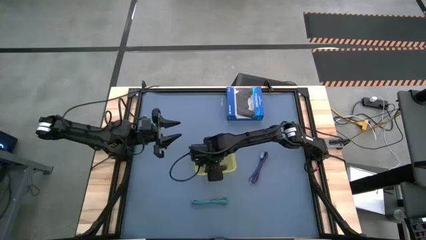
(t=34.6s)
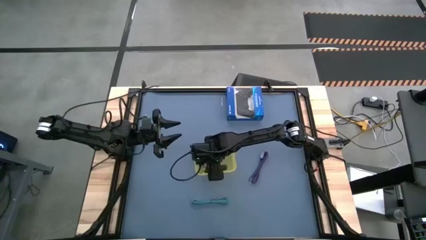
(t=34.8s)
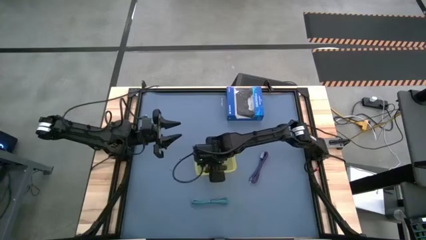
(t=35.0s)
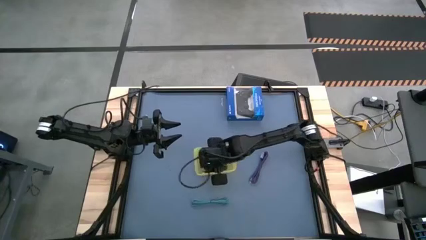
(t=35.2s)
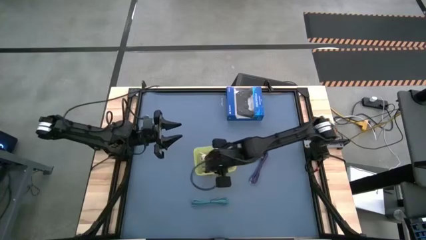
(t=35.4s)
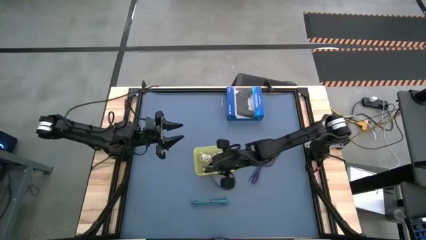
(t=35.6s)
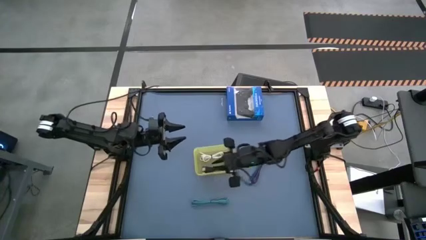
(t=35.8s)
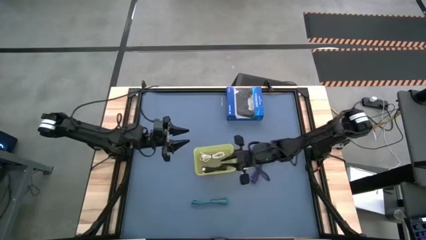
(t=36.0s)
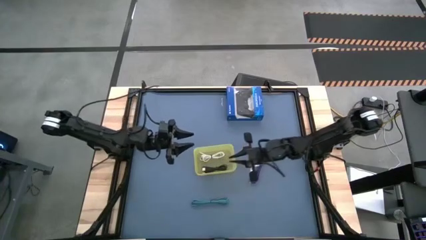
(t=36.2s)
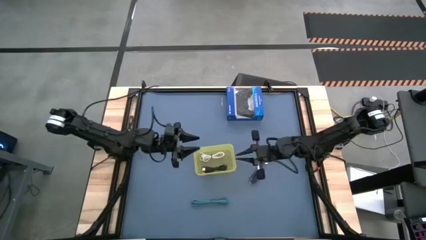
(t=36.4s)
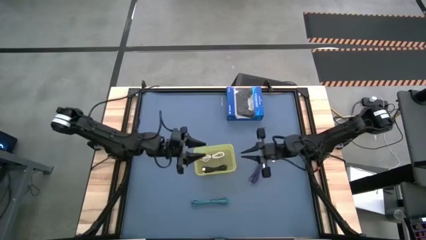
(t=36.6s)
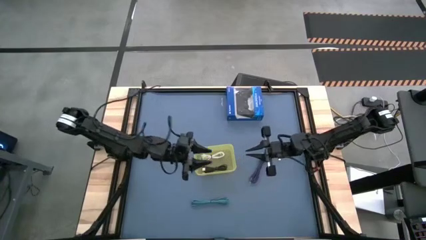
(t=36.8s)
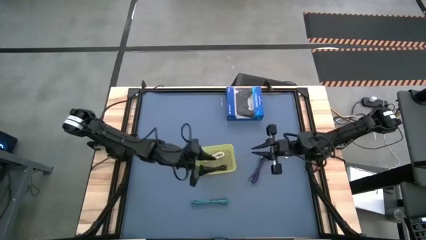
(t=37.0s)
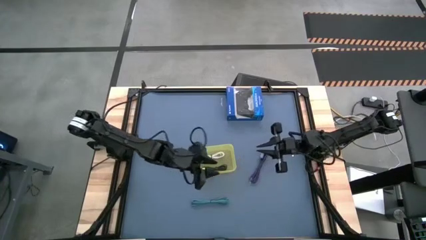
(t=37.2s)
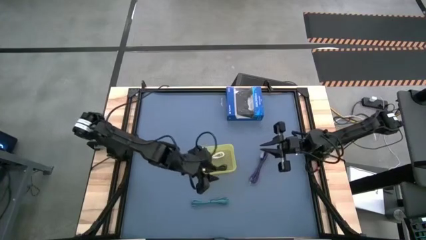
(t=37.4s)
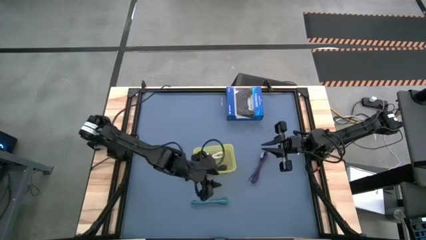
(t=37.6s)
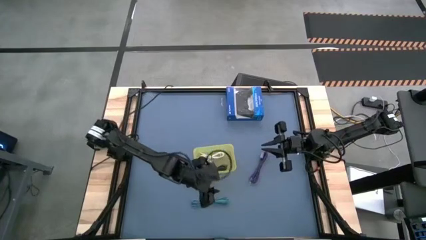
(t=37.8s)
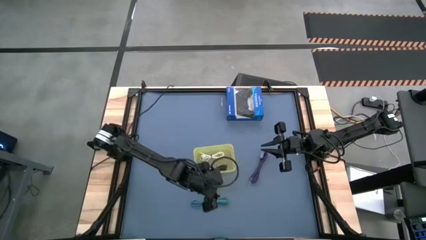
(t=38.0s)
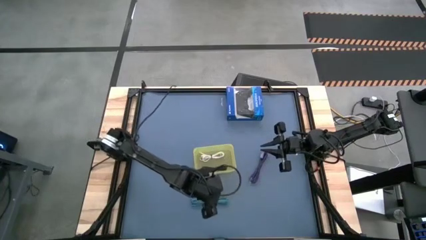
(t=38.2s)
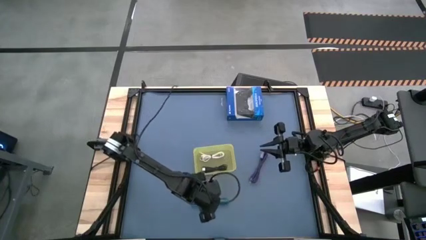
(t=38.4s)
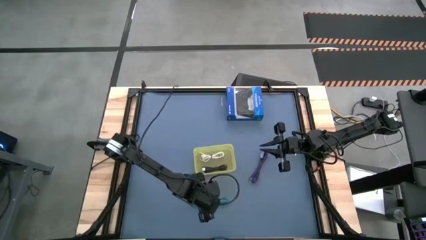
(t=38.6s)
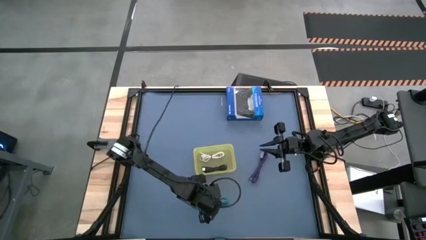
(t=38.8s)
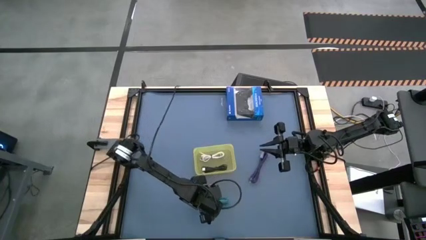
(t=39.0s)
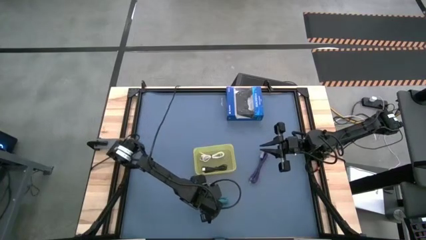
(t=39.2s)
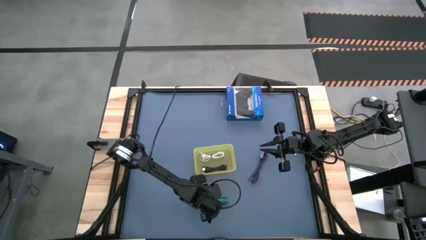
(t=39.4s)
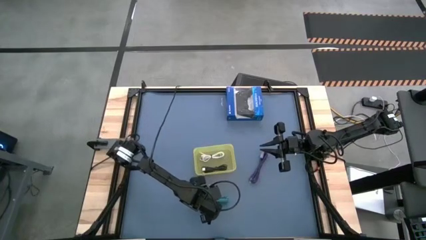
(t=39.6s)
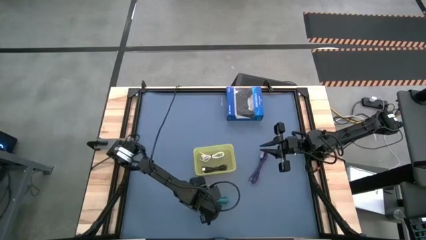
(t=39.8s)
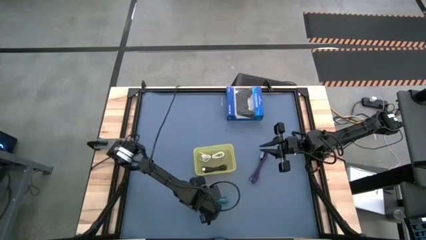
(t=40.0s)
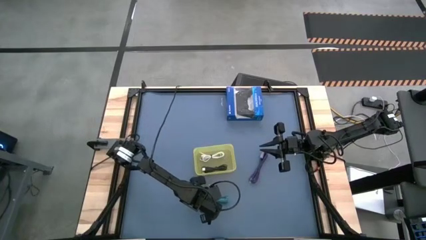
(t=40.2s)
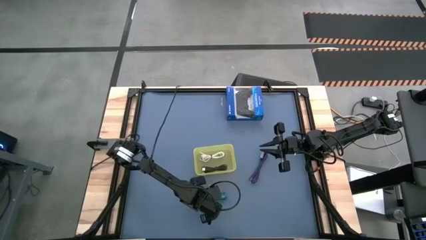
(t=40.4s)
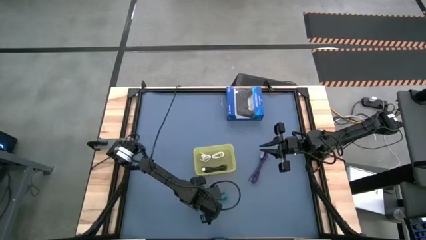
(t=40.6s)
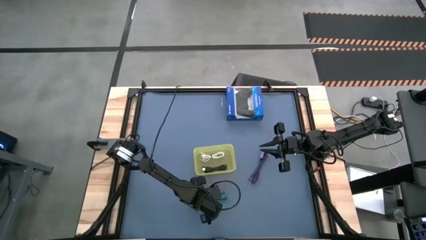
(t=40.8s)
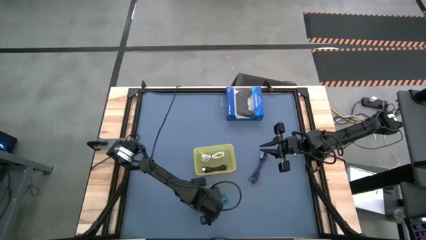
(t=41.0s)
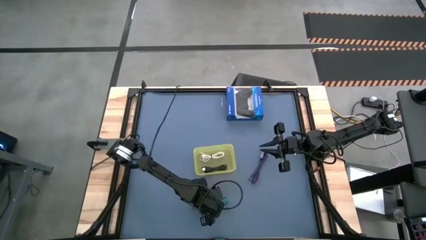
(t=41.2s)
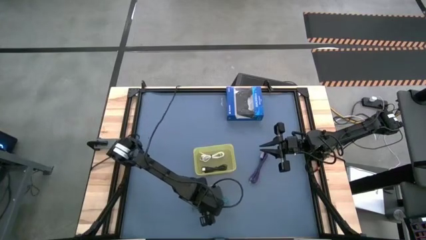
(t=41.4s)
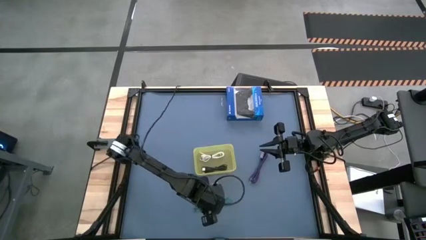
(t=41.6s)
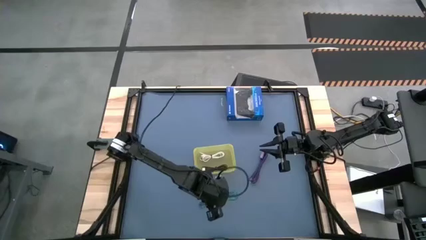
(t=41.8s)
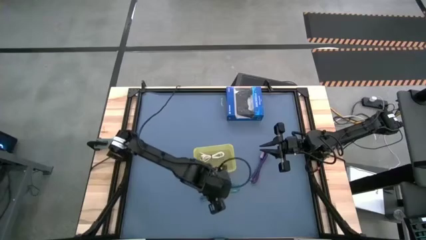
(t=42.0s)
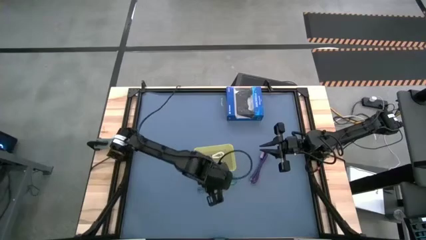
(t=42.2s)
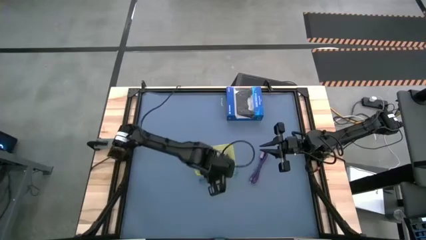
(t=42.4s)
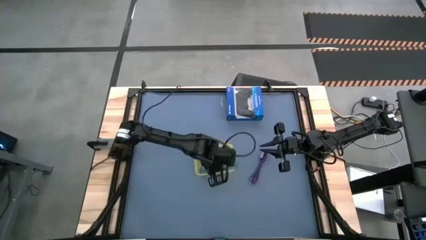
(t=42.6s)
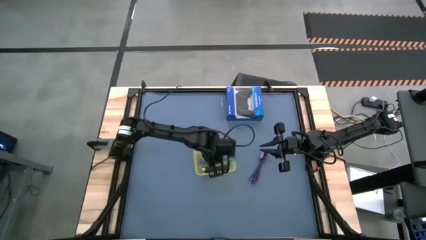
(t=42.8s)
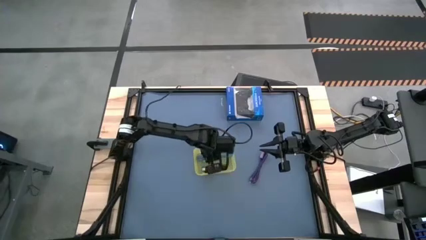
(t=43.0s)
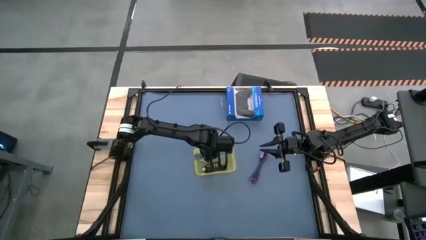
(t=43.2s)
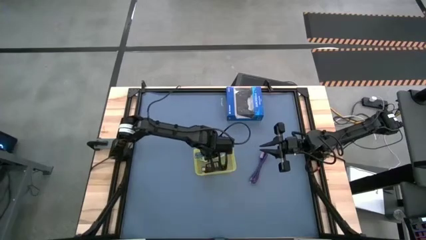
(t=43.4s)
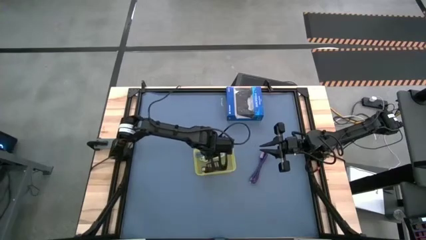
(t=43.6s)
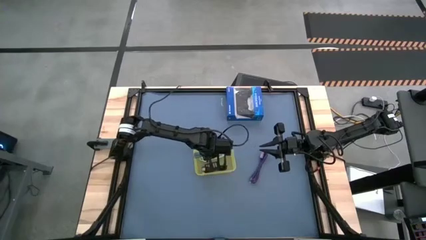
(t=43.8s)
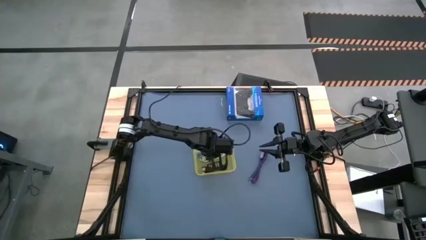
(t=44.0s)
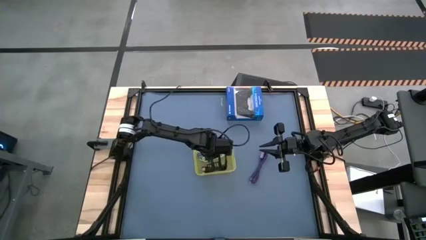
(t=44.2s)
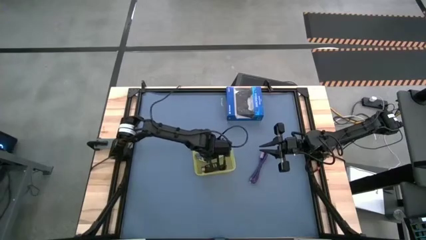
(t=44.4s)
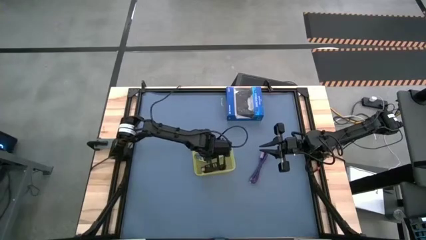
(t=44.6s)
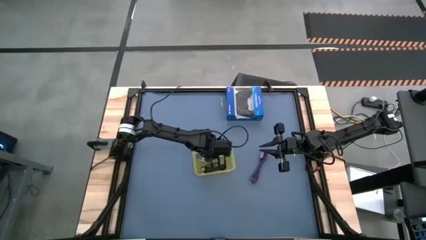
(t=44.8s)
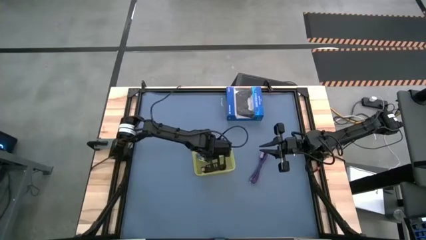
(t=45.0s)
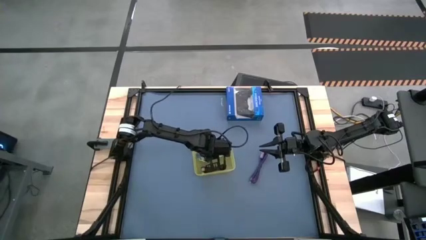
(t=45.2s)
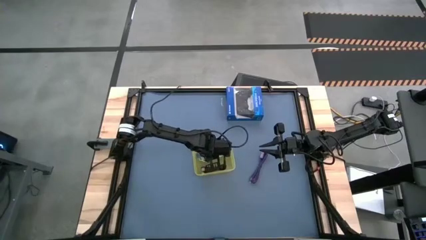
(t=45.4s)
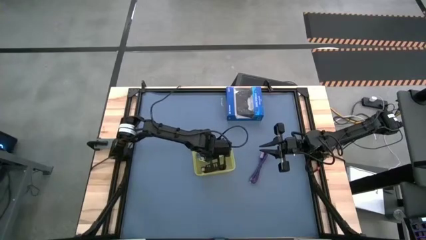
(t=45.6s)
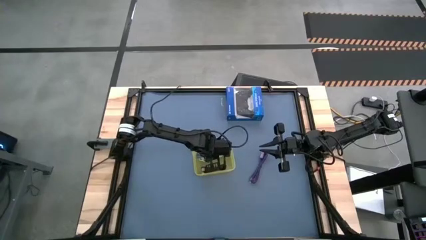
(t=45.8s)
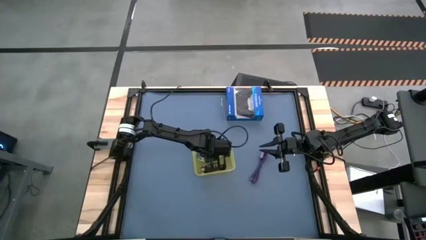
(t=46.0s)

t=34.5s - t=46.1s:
Task: Pick and place USB-C Cables
Put the blue charger cable into the yellow bin

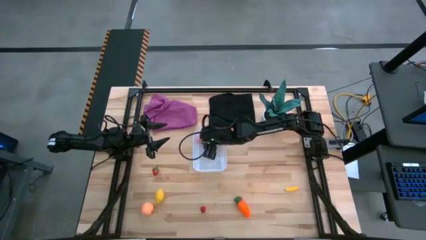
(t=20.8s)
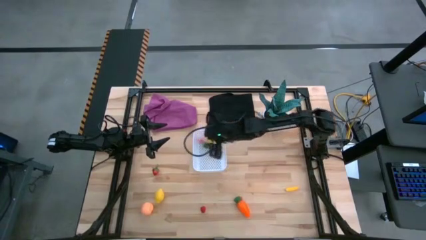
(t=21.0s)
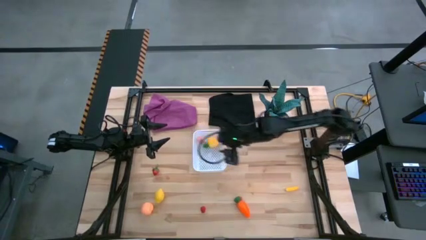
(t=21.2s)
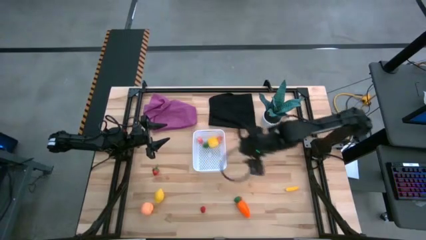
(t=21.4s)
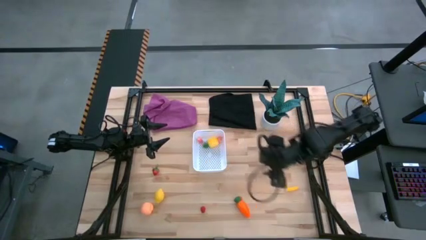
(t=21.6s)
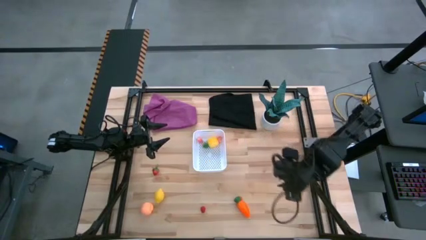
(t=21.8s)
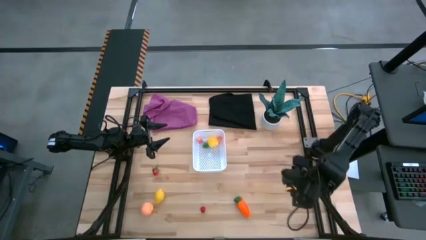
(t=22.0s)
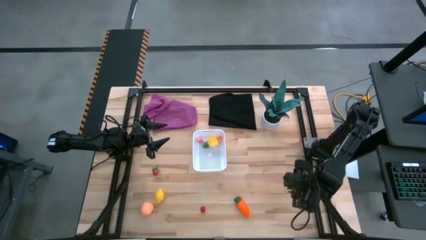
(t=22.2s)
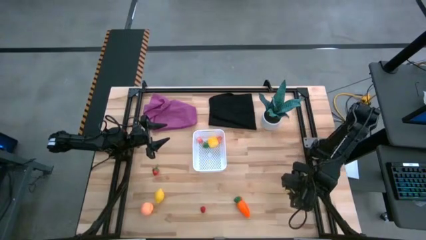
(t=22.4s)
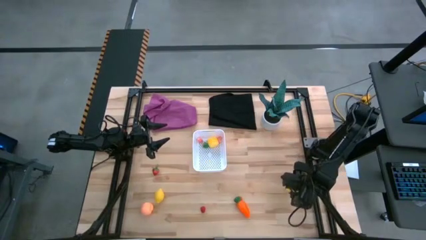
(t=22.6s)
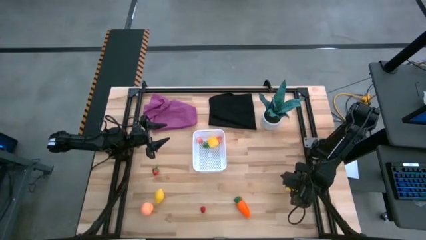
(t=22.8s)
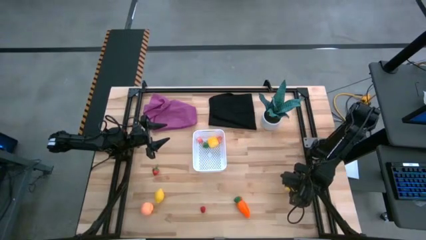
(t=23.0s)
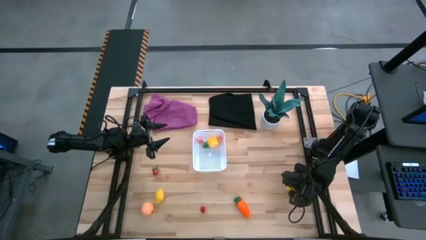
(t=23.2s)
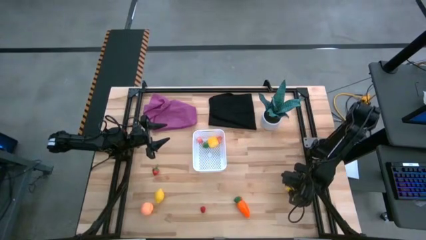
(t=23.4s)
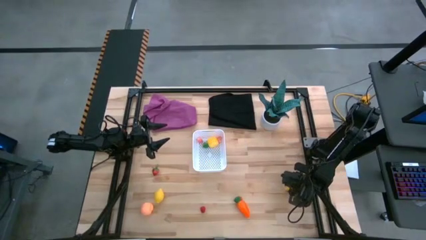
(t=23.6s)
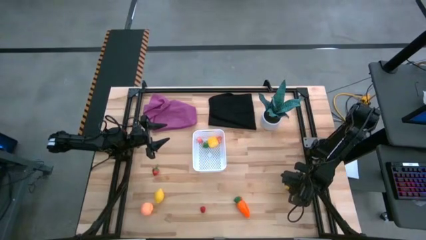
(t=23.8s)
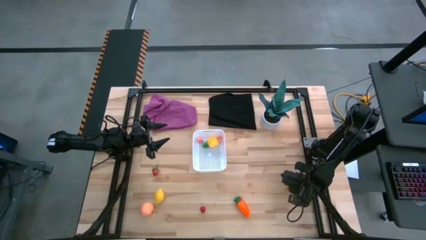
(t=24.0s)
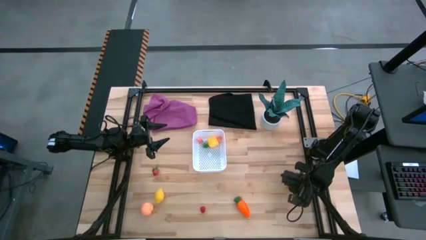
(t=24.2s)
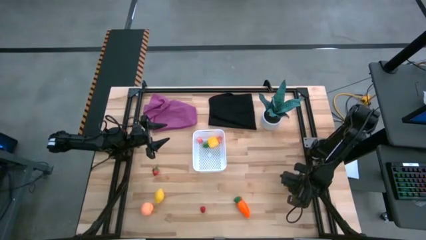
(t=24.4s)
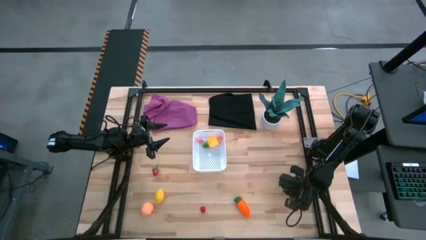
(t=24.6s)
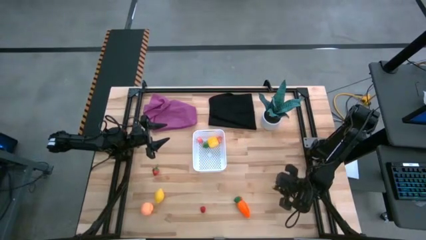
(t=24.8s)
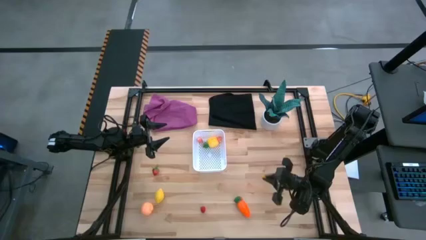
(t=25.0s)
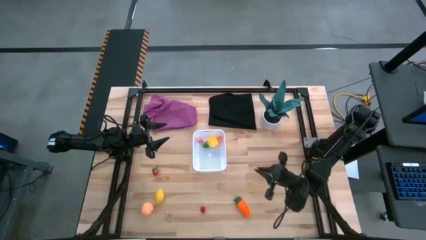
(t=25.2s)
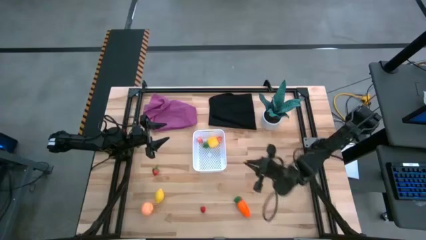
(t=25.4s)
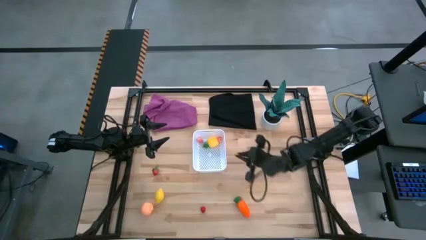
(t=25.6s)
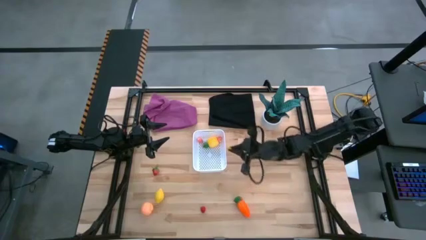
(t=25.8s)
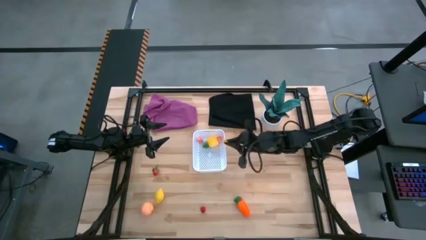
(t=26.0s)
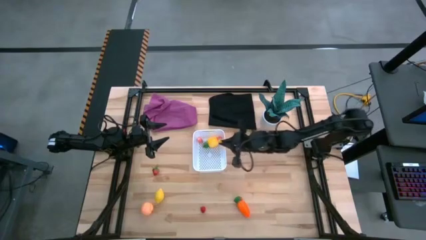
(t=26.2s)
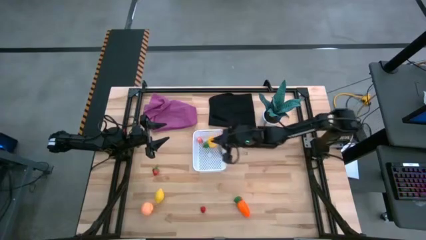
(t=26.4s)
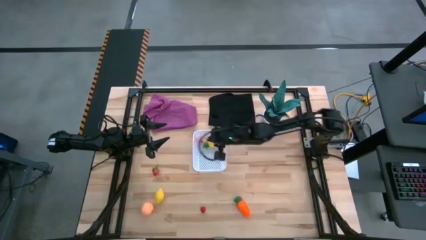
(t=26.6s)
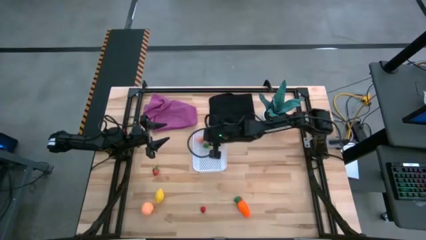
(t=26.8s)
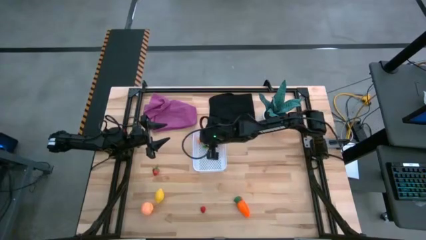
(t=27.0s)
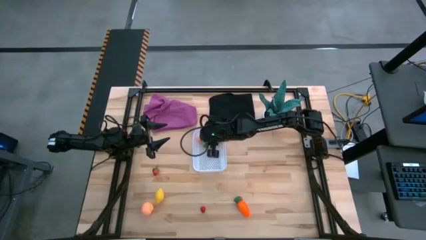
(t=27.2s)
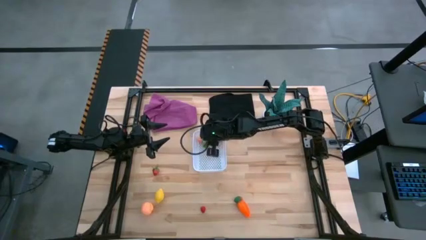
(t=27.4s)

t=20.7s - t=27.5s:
Task: Pick and placing Produce into tupperware
Put the yellow corn into the white bin
